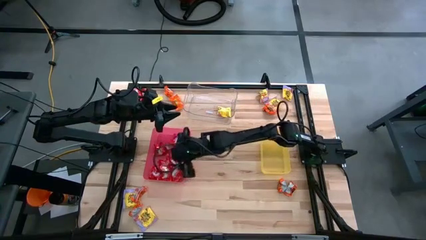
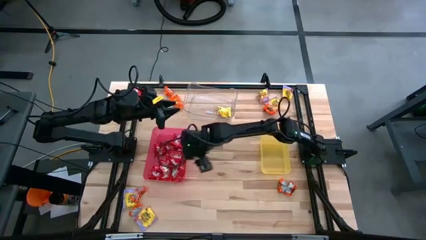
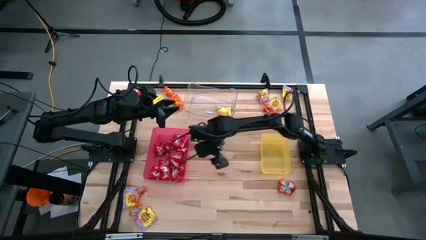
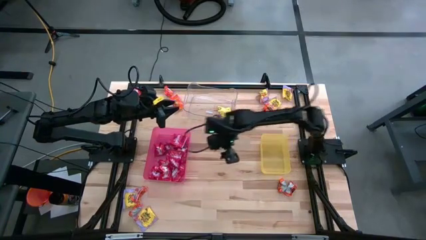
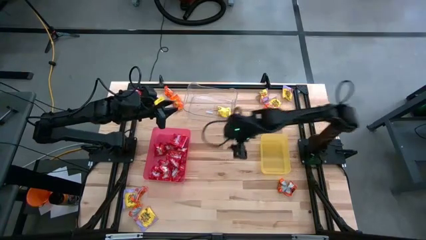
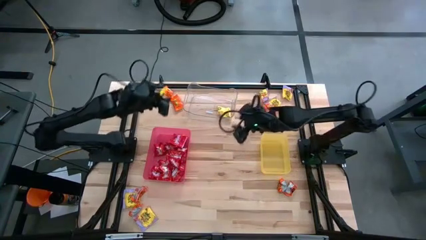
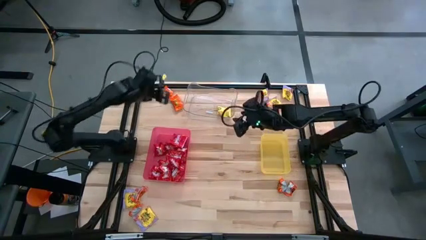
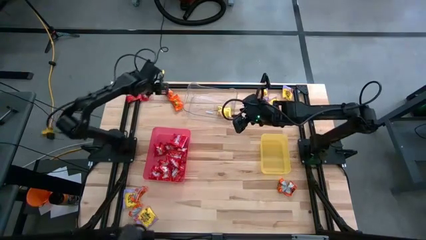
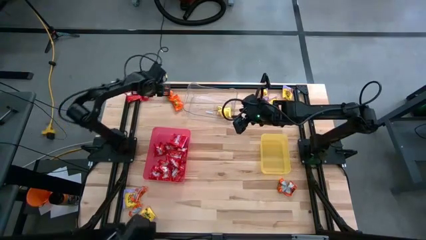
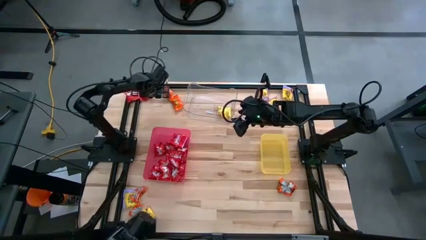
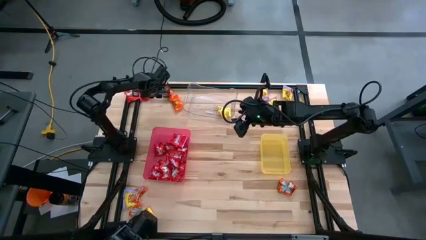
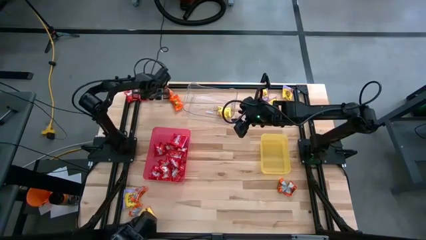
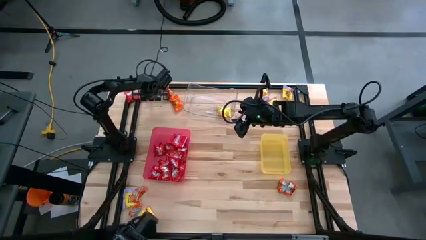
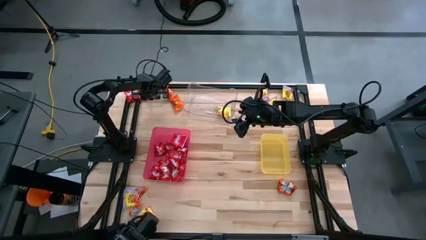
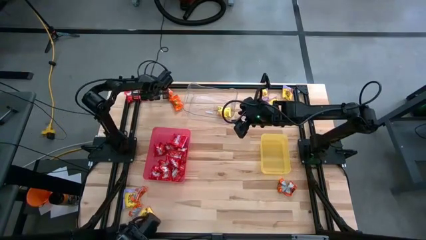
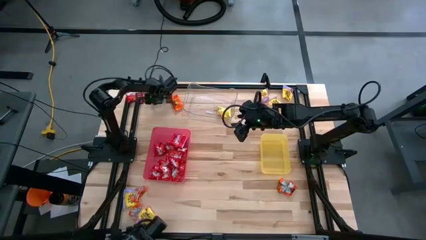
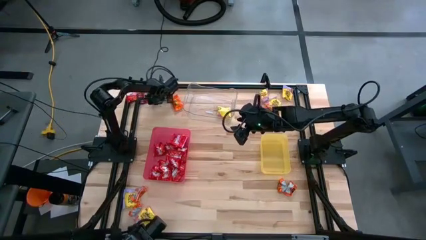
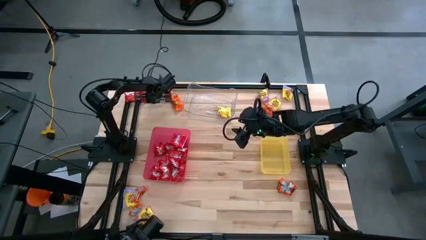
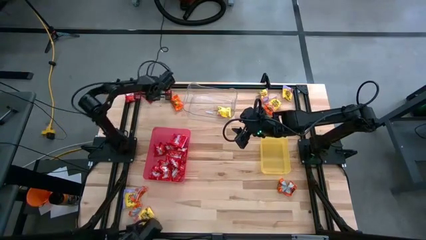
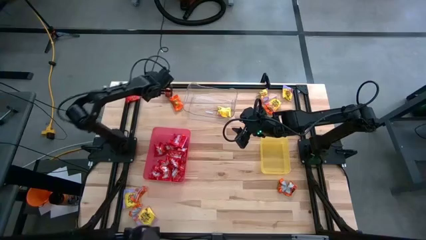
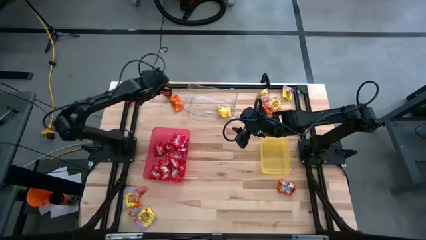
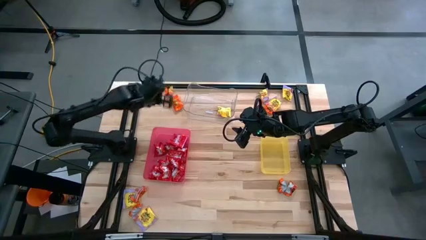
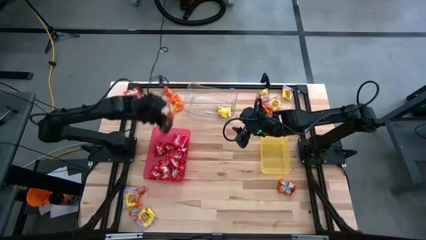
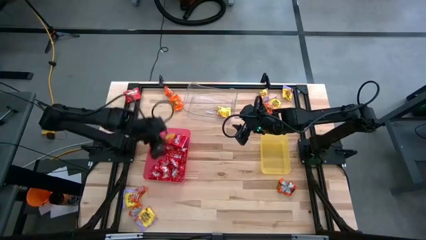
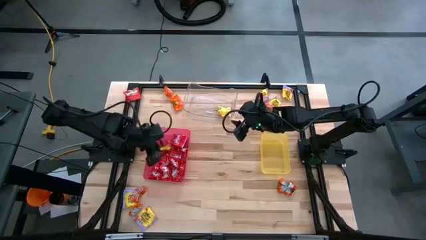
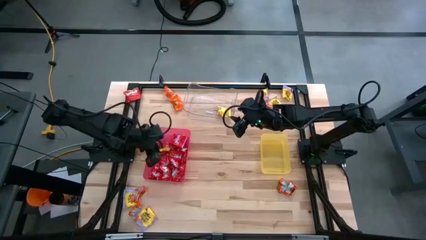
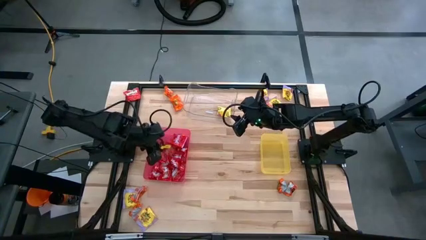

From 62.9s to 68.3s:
Task: Sort candy
Put the red candy into the red bin

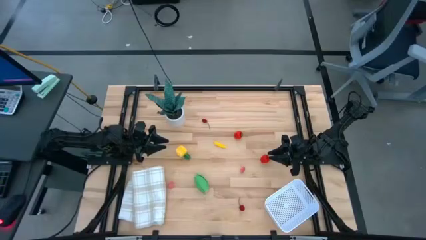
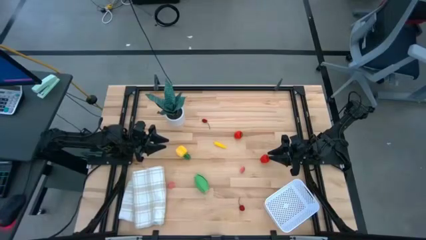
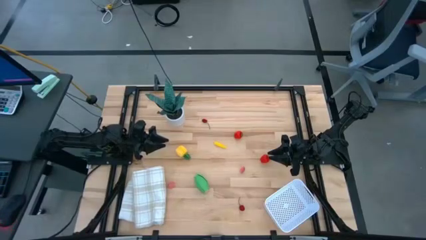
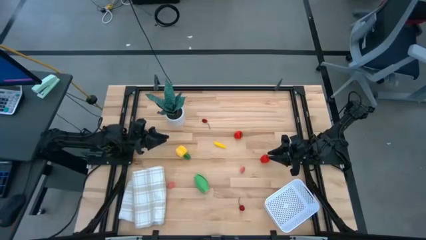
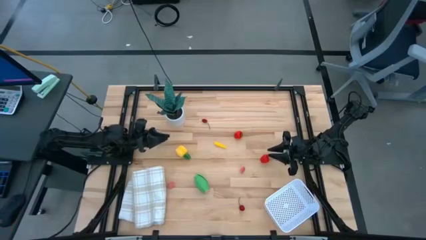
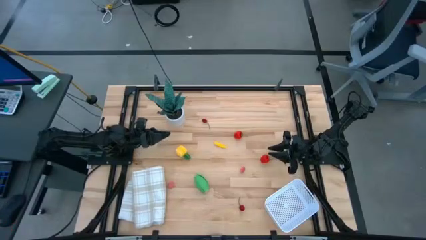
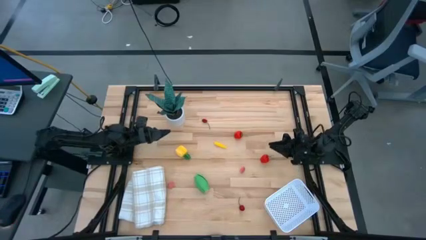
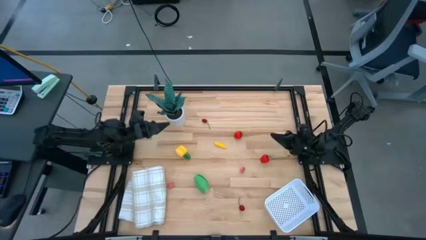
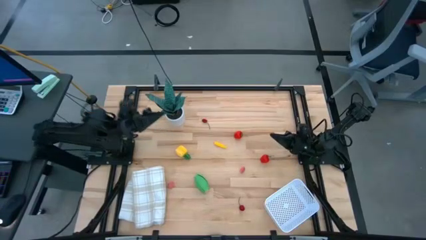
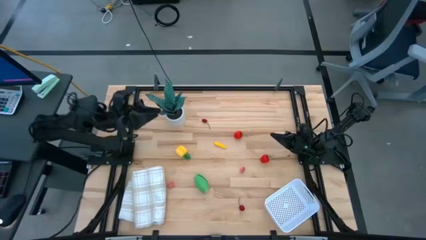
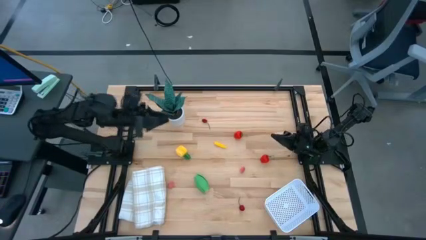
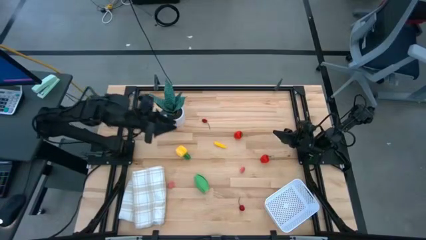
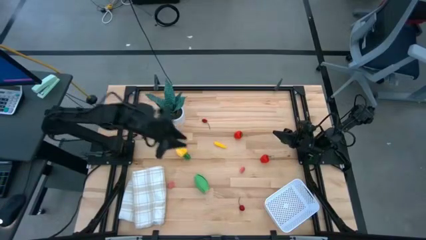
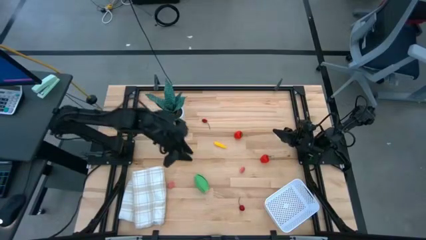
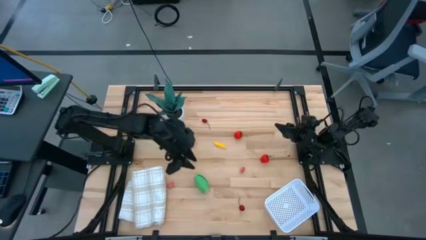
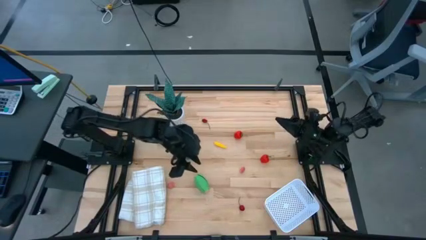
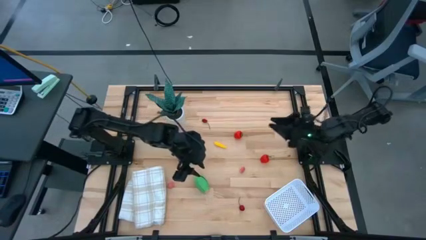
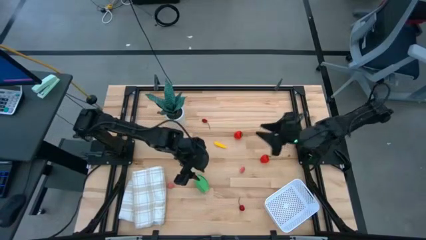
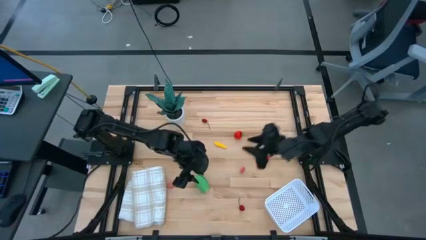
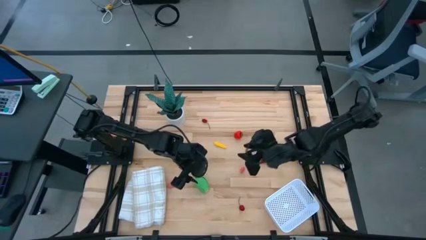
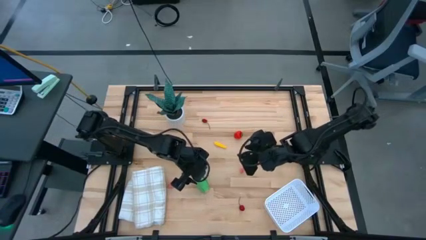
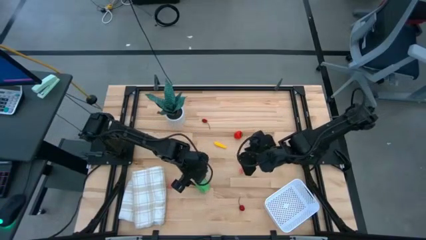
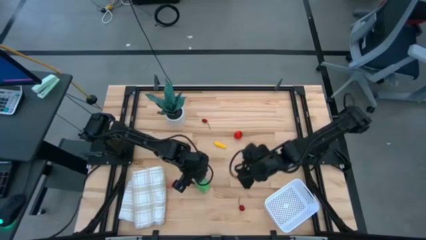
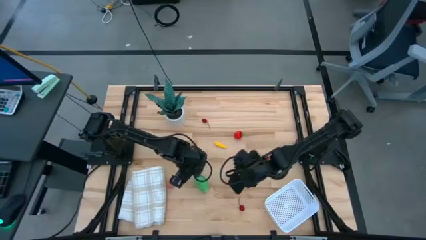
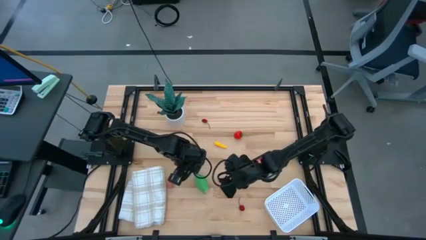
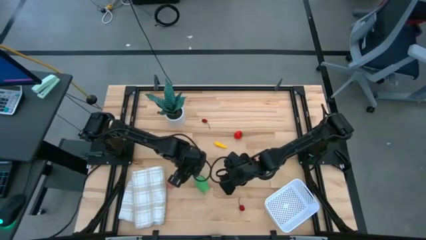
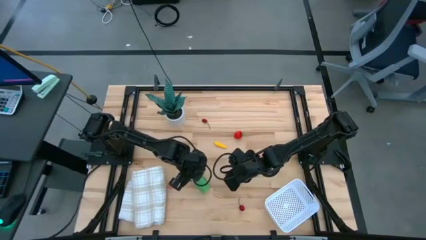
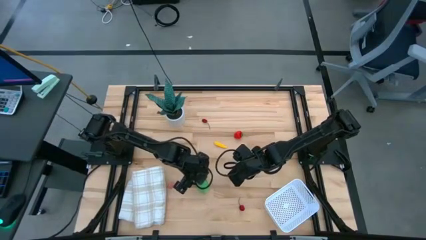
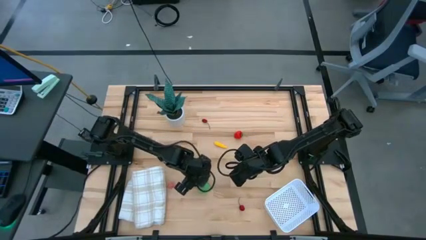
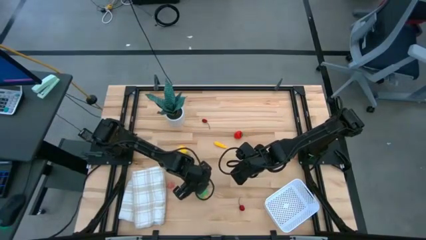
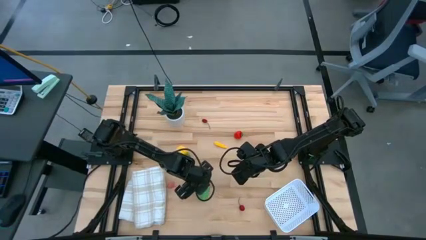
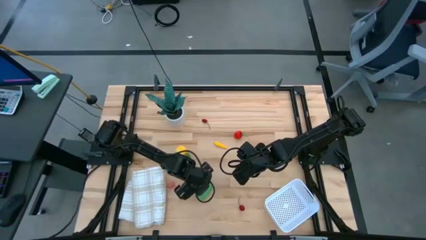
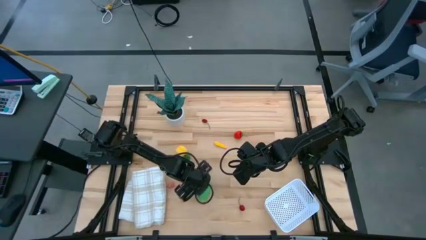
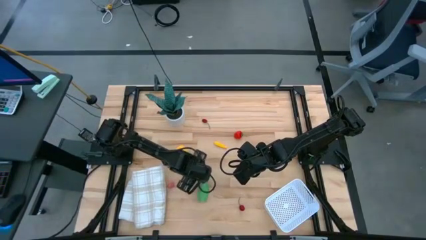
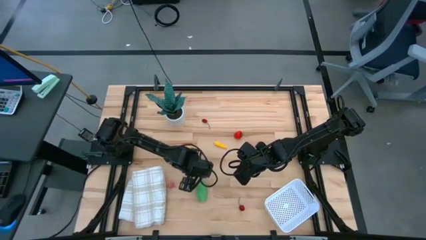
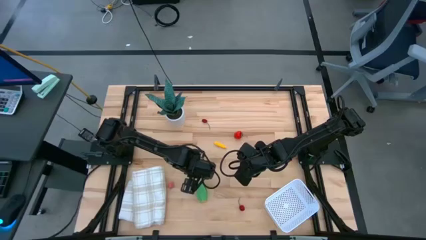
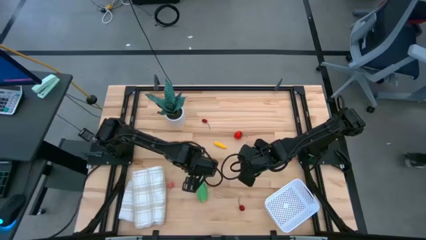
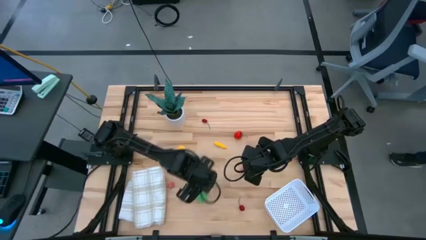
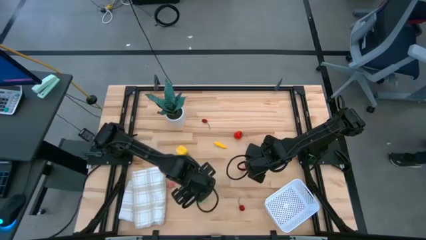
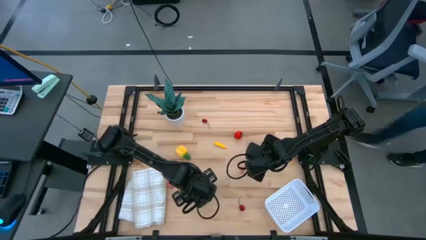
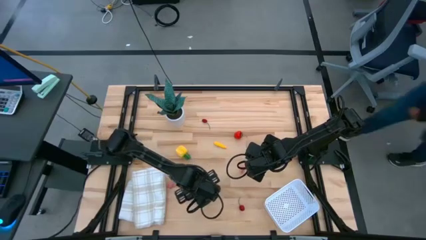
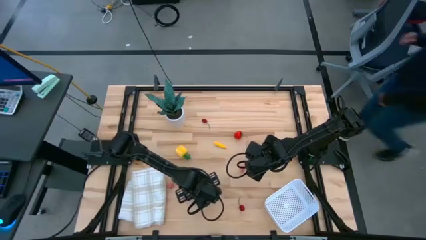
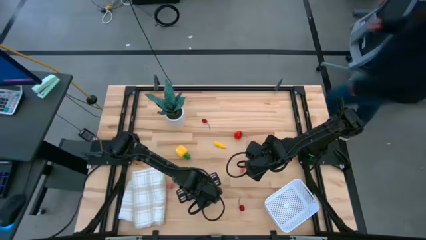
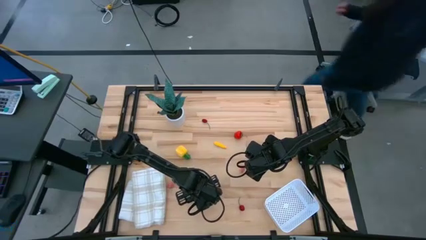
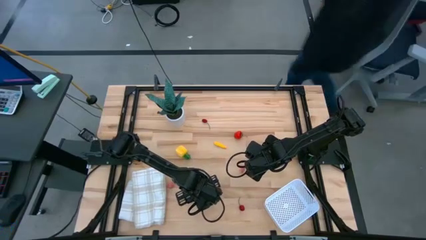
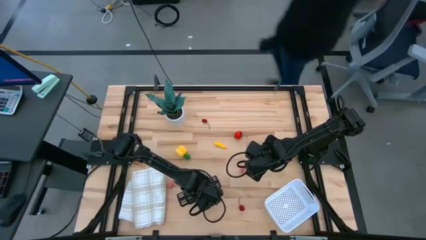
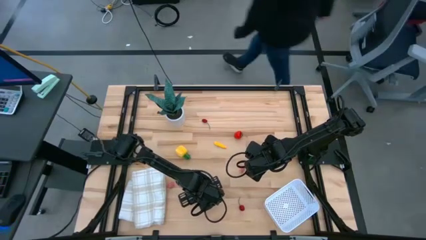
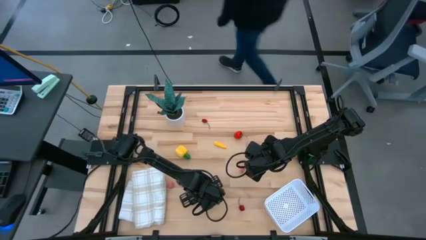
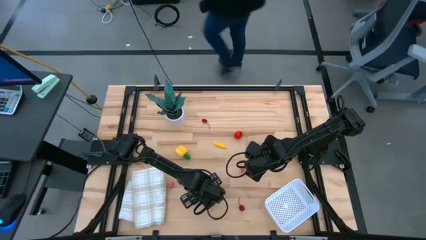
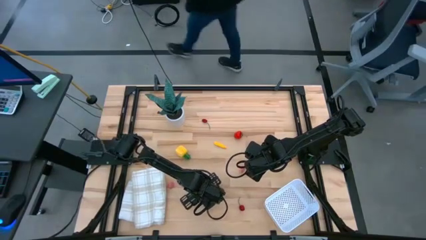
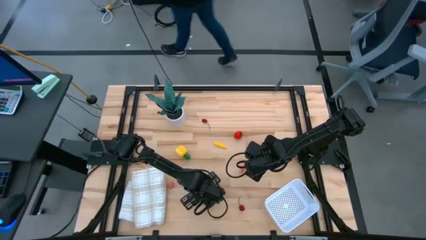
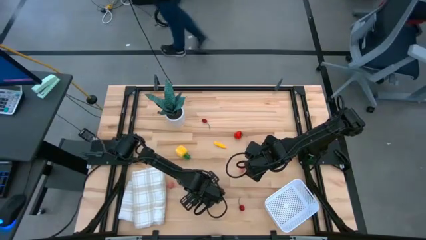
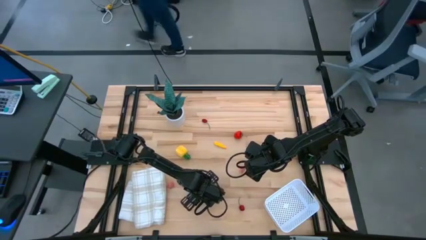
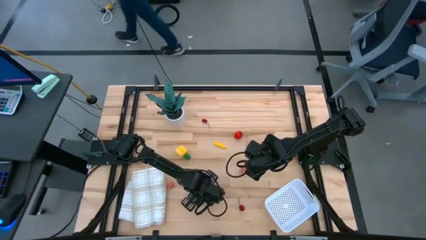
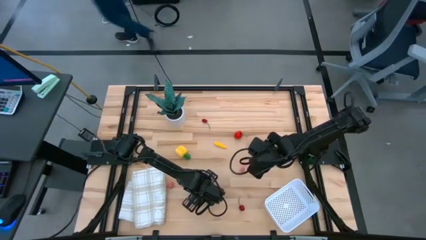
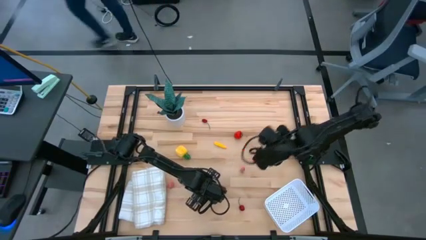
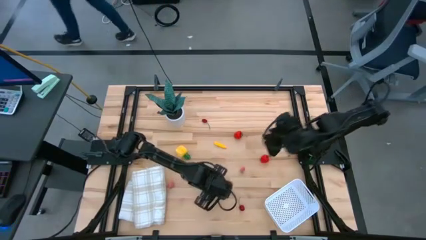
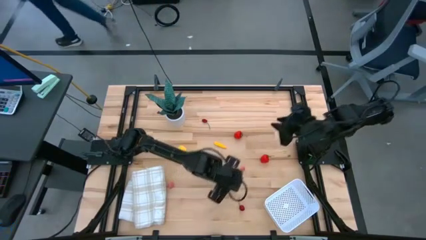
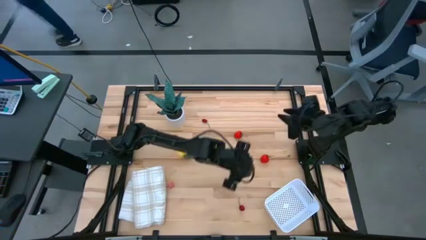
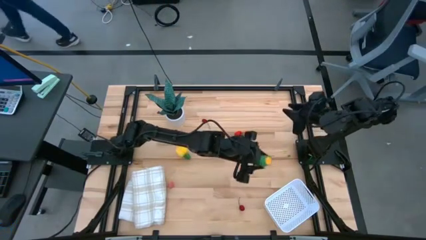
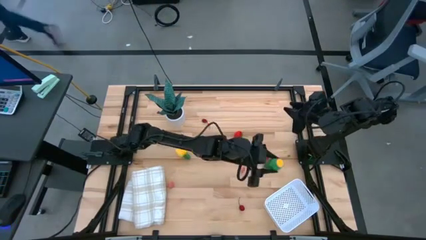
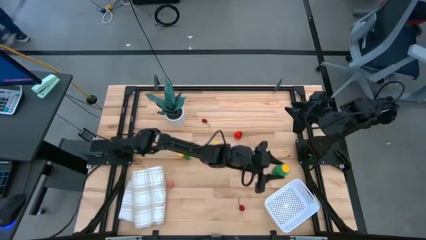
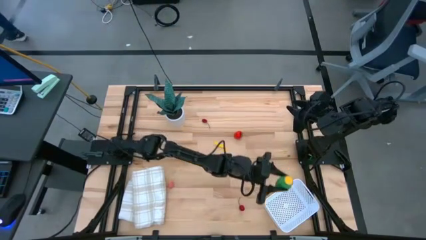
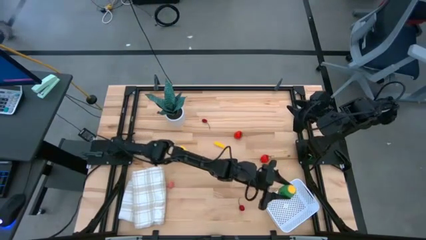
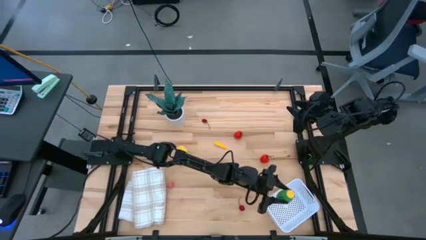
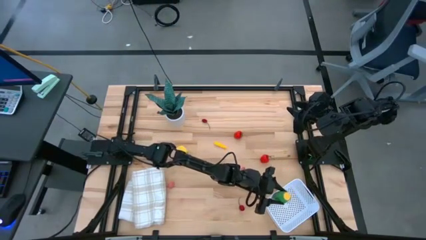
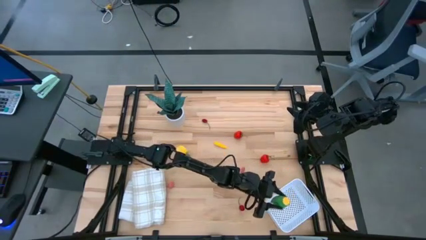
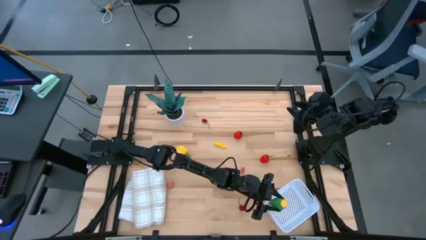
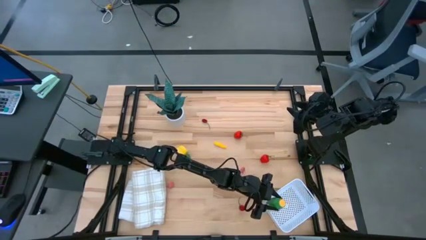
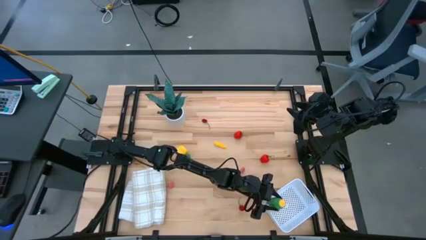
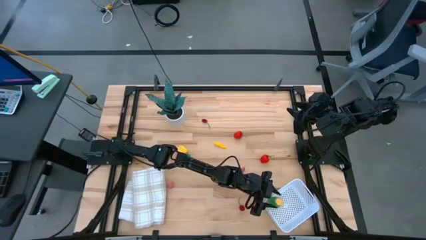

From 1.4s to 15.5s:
Task: Pick and placing Produce into tupperware
Put the green corn into the white basket
